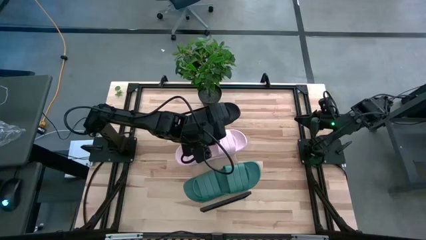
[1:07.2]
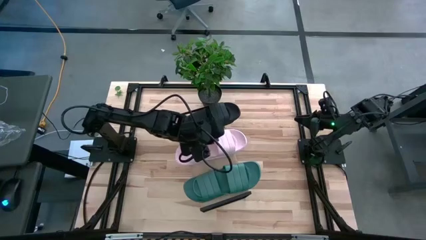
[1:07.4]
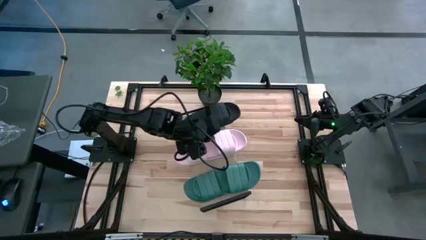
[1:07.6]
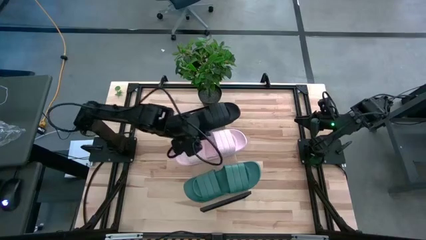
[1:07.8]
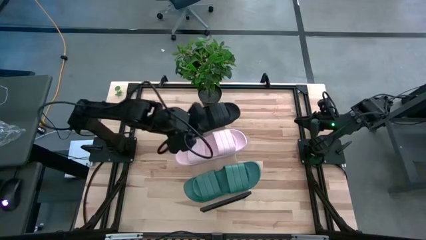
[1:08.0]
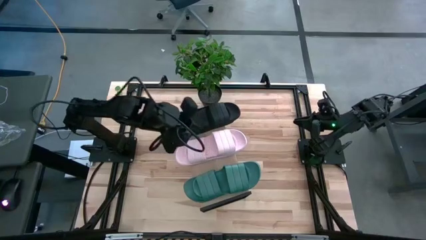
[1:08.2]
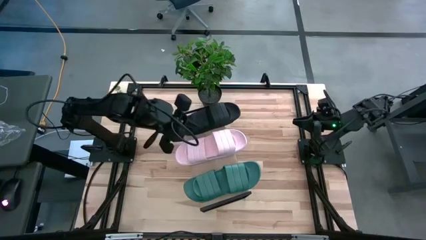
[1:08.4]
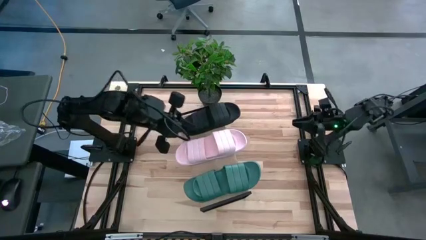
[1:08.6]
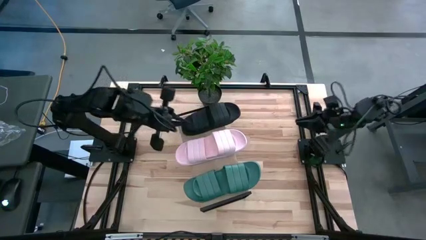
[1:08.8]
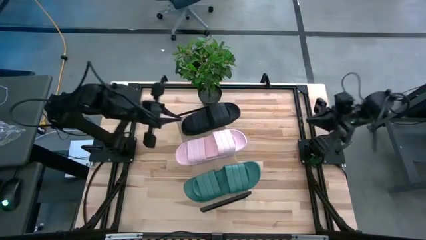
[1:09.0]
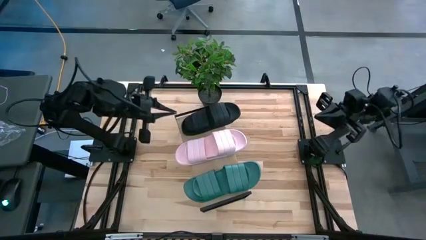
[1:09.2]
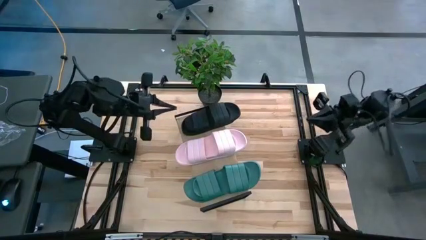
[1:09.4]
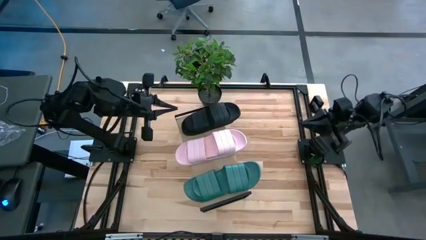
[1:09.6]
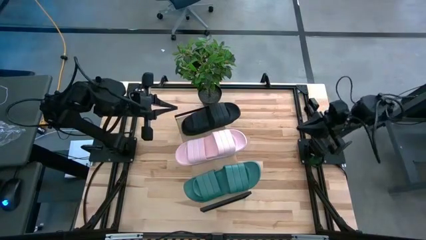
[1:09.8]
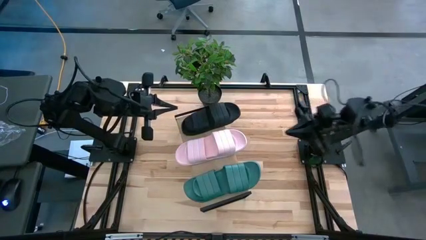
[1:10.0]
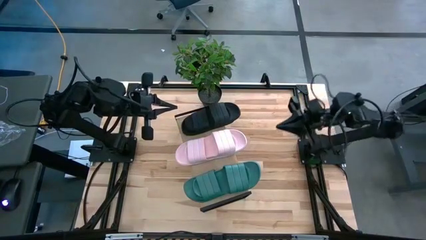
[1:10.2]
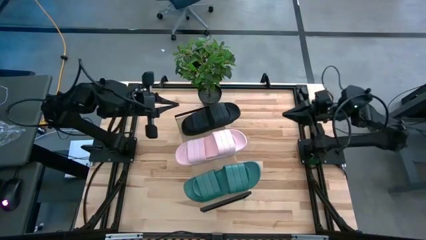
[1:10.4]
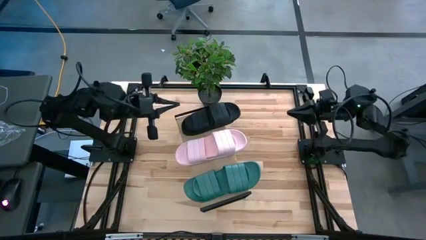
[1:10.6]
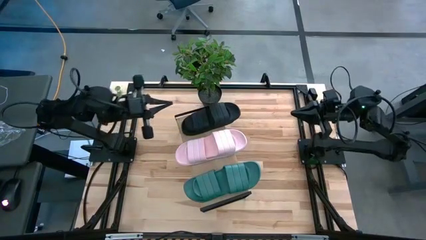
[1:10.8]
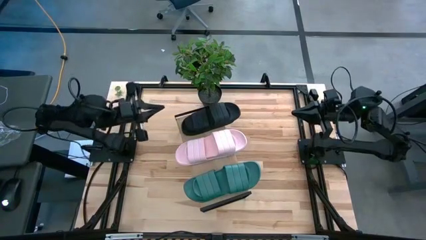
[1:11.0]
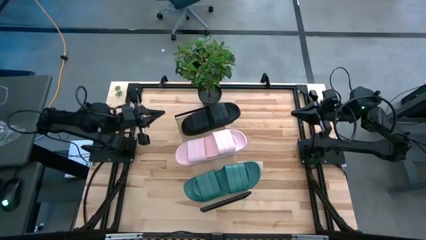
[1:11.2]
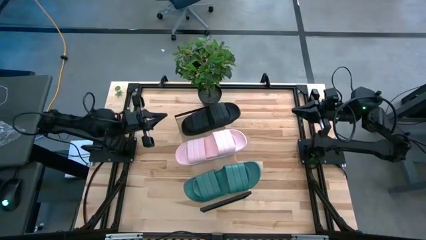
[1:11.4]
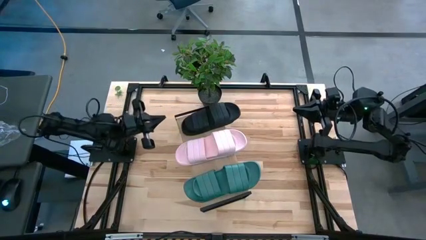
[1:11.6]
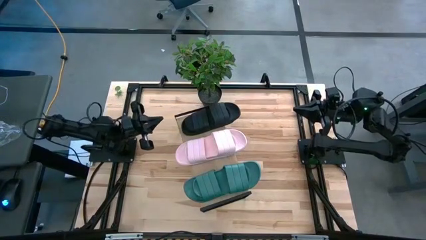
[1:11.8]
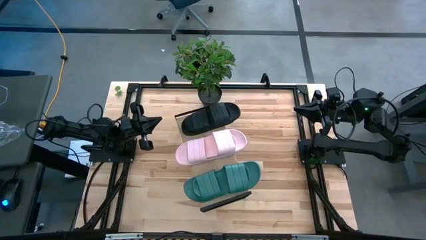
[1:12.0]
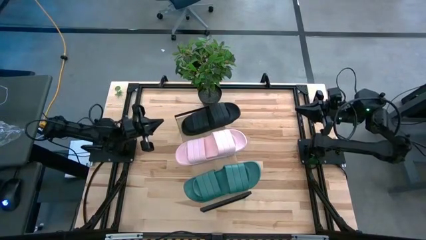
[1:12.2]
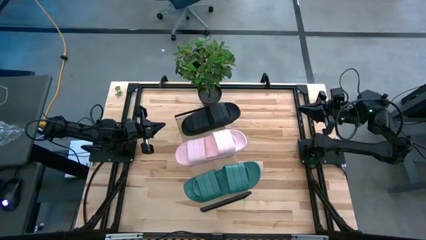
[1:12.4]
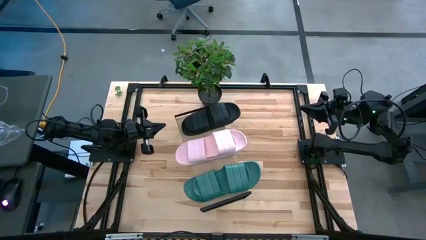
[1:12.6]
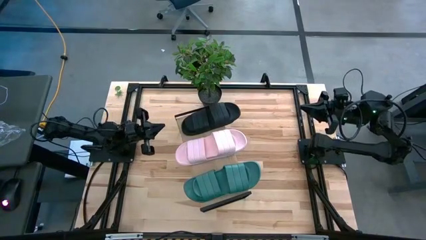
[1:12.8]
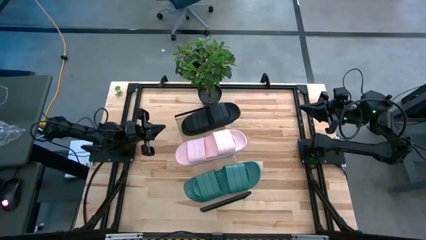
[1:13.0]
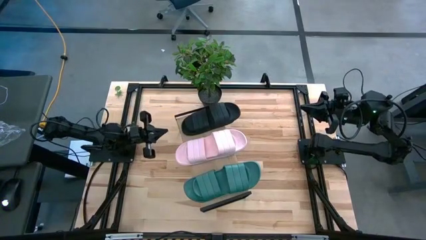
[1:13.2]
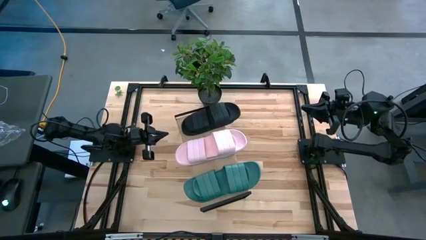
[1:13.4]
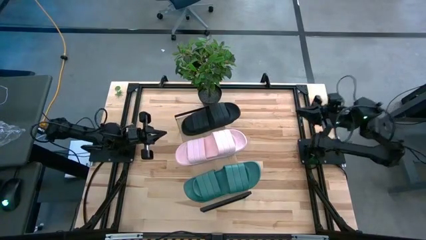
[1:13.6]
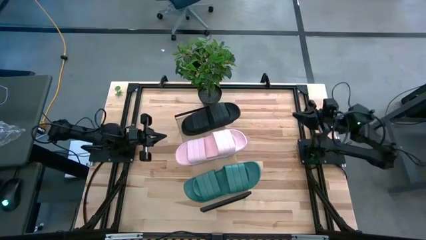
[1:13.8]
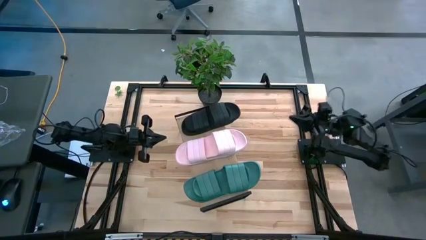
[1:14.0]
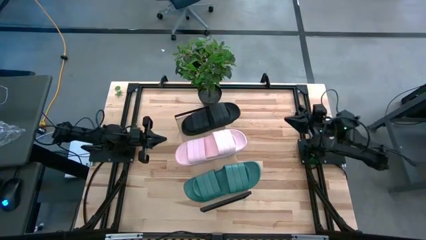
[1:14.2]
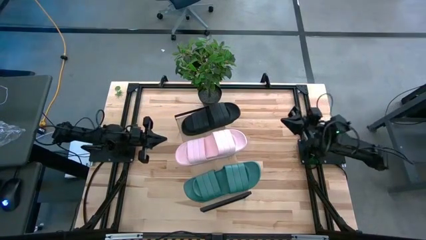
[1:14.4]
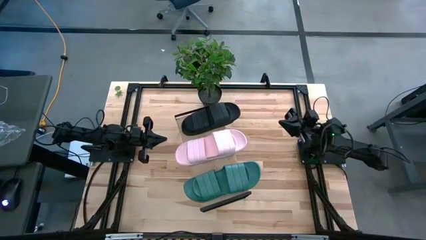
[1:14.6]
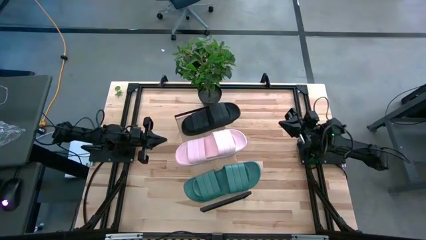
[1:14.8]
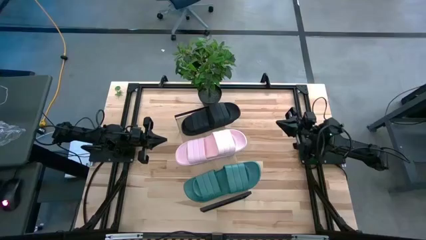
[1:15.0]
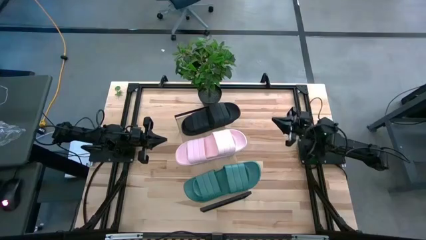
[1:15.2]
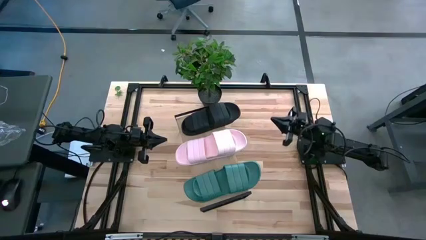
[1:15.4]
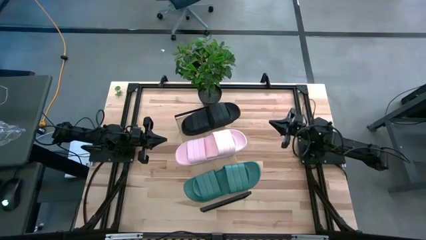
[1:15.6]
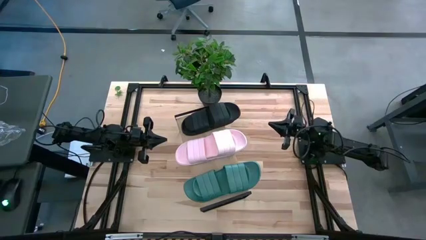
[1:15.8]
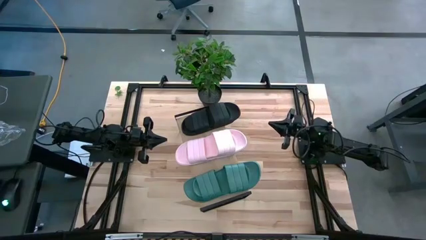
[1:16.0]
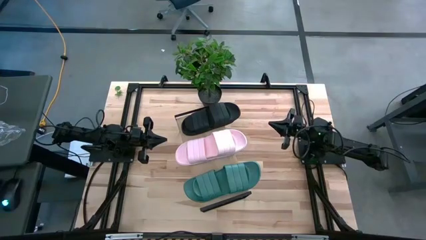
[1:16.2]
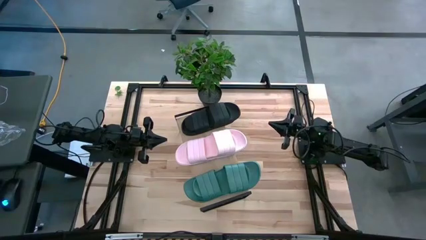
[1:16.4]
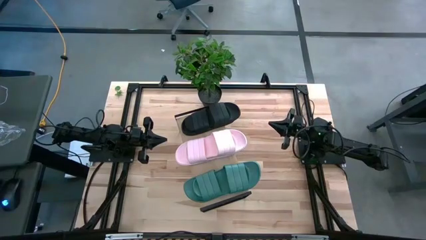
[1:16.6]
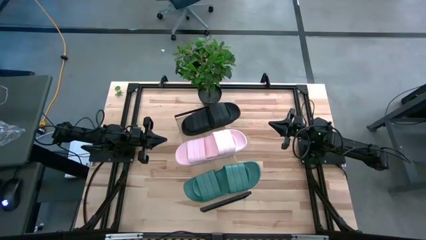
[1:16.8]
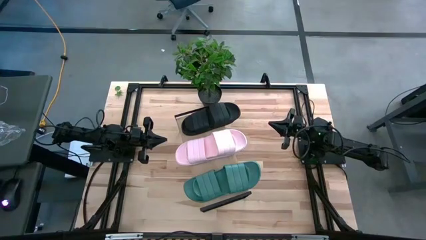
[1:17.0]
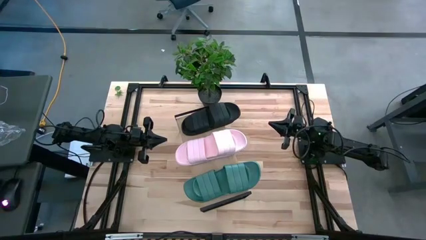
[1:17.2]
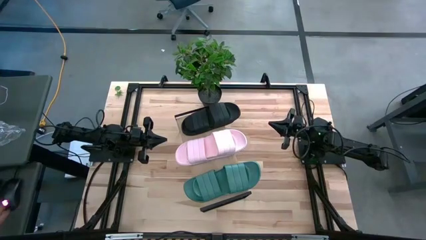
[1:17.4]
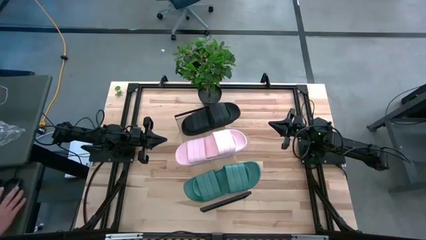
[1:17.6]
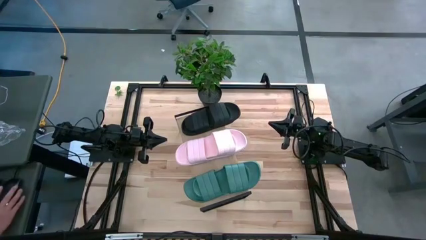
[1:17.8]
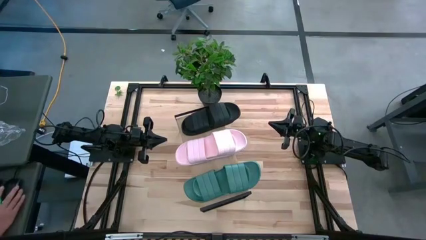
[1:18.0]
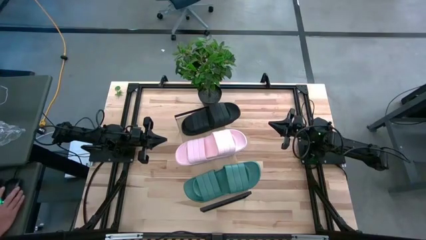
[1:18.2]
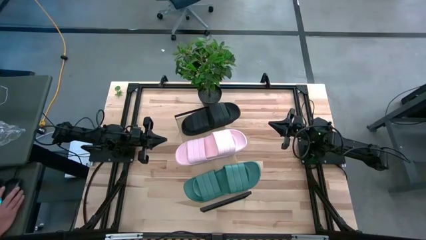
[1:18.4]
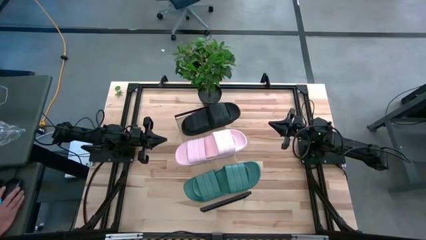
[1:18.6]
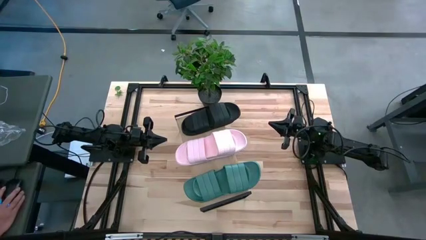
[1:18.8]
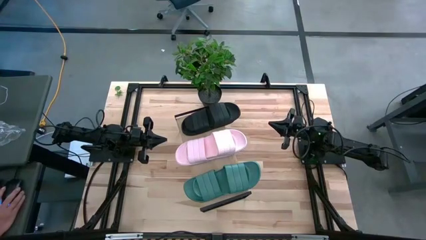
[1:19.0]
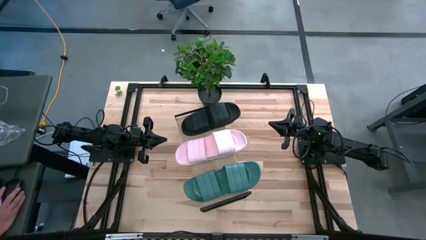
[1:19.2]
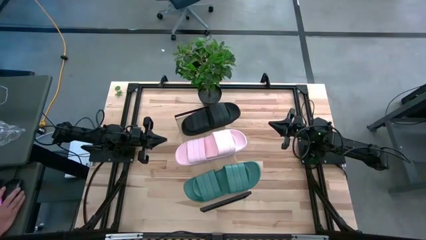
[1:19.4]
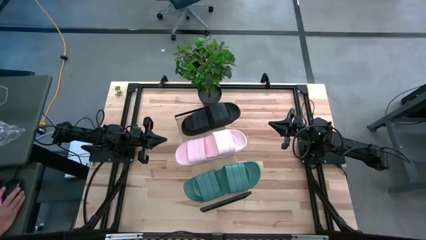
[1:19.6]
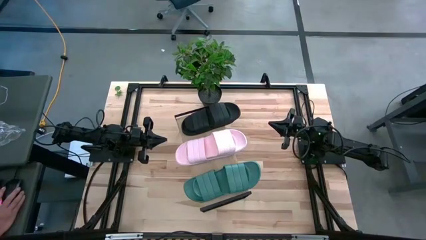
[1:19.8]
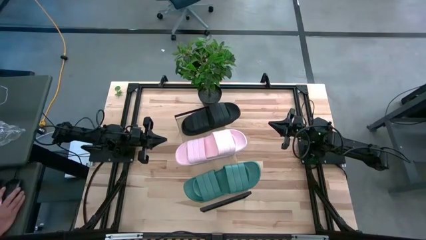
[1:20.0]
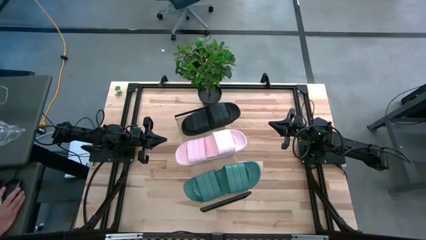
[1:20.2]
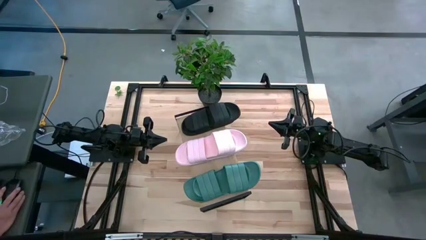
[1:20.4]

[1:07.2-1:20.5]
Task: Pick and place slides into the shelf
Return to Home Position

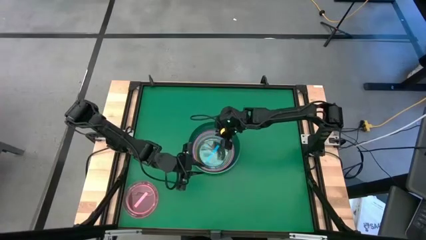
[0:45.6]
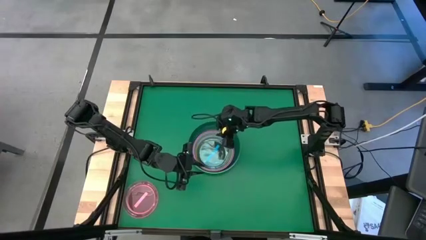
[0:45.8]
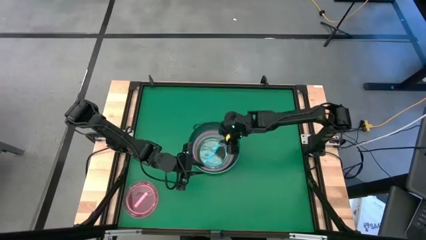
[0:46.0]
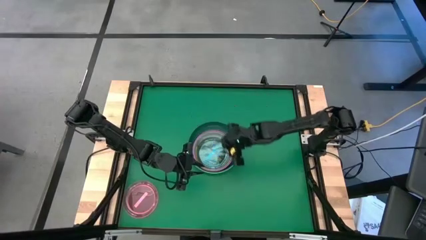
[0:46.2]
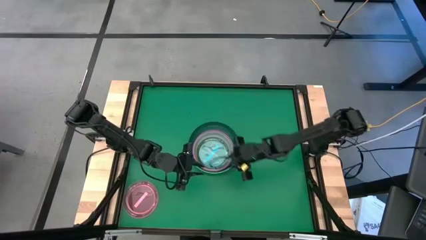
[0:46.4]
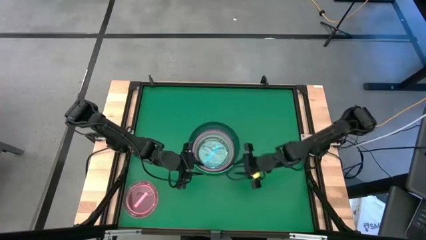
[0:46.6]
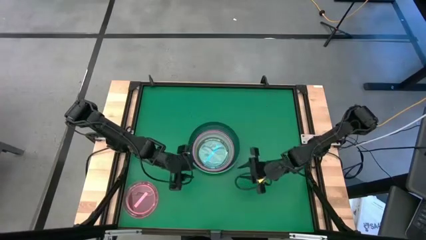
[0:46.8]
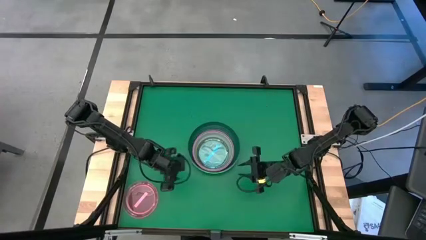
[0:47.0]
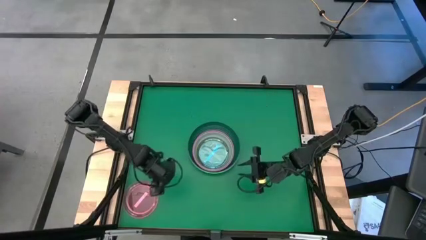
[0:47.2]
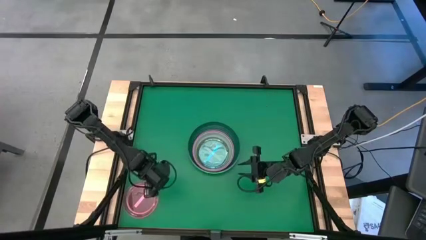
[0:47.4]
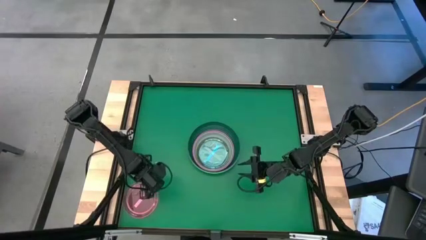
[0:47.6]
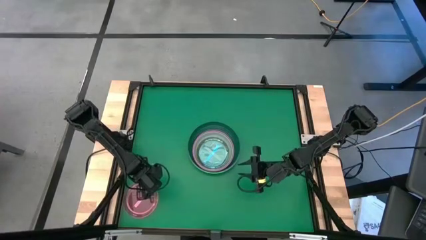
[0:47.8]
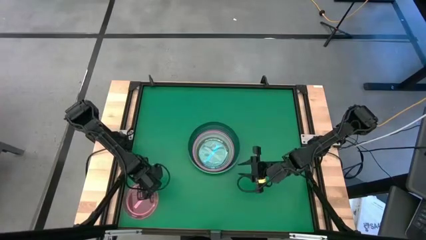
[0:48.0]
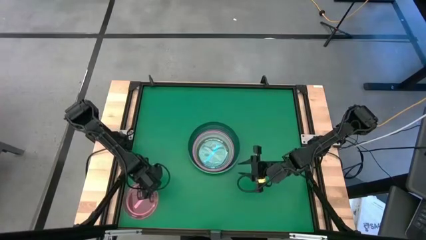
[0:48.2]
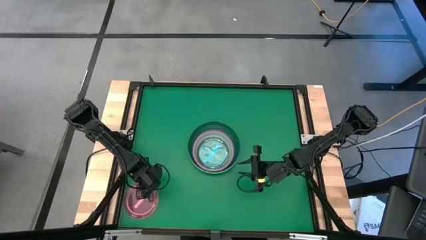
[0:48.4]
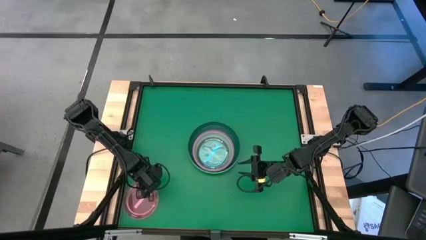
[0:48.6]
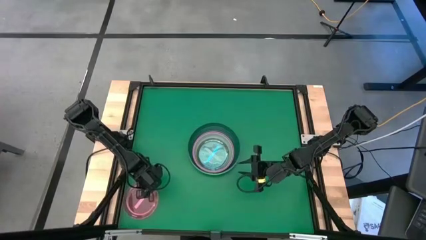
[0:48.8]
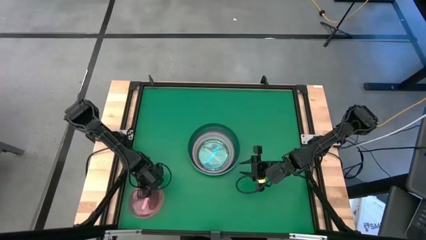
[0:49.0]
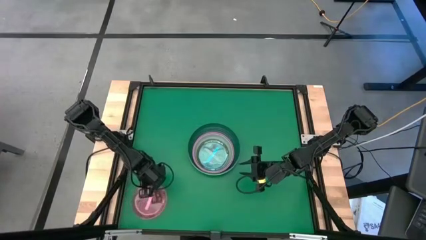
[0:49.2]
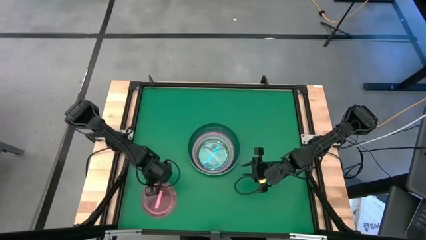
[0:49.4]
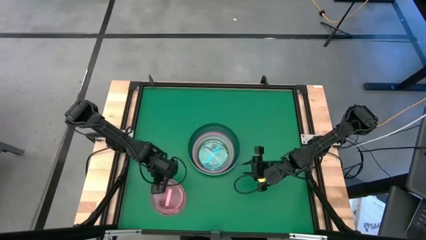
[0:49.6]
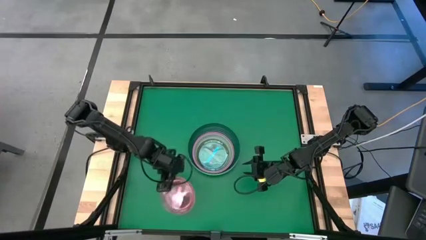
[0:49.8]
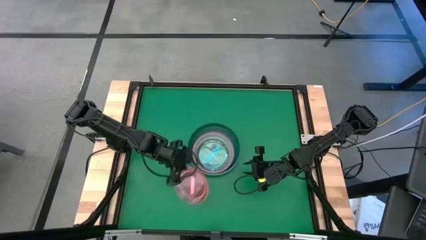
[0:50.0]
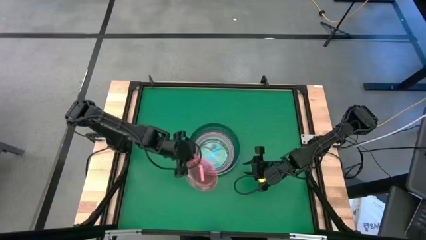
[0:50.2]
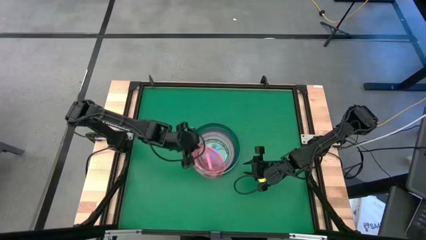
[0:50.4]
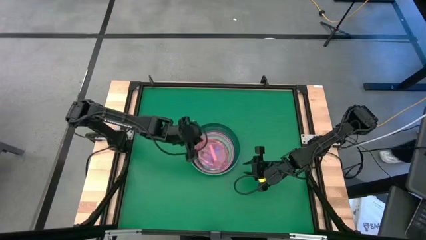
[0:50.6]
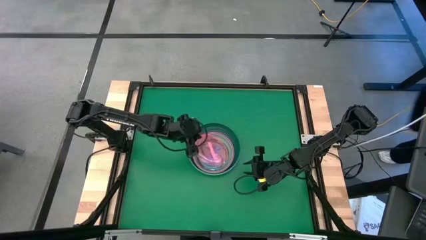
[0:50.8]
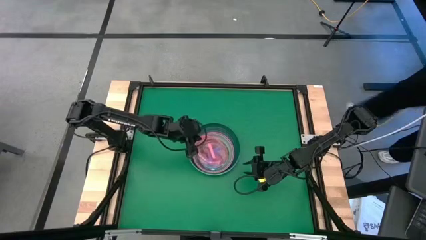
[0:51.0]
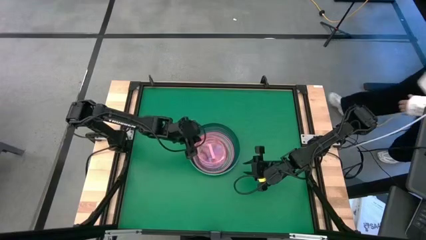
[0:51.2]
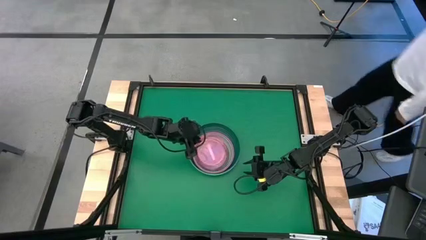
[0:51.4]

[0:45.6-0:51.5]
Task: Stack plastic plates
Stack the pink transparent plate on top of the blue transparent plate
